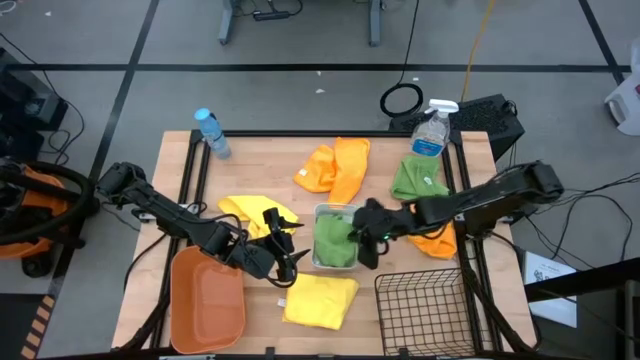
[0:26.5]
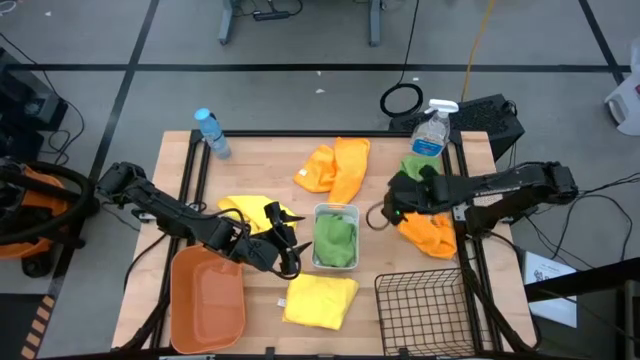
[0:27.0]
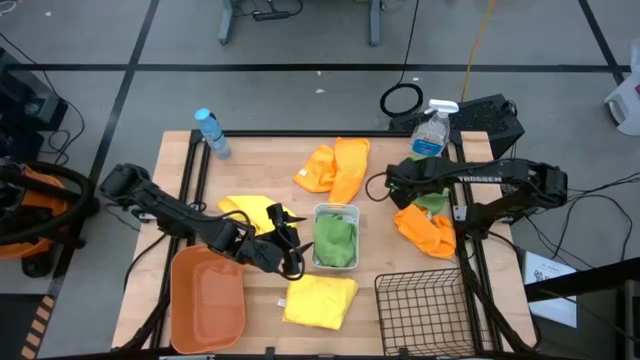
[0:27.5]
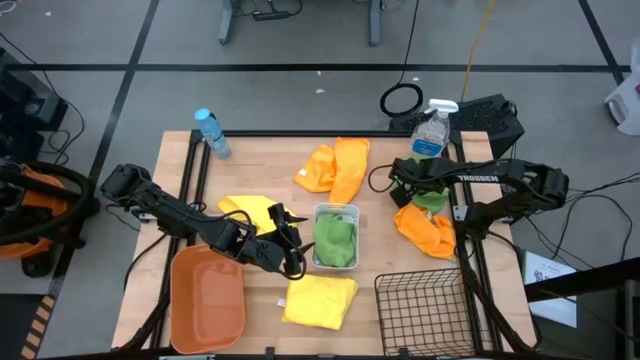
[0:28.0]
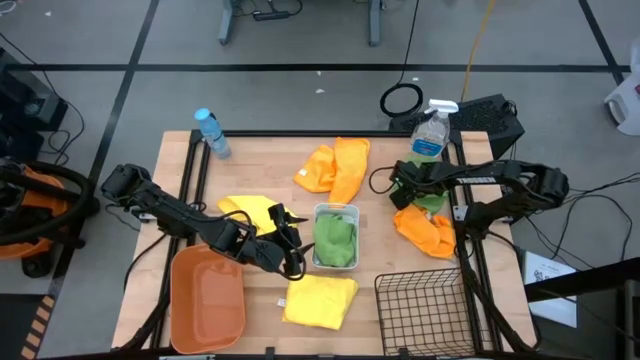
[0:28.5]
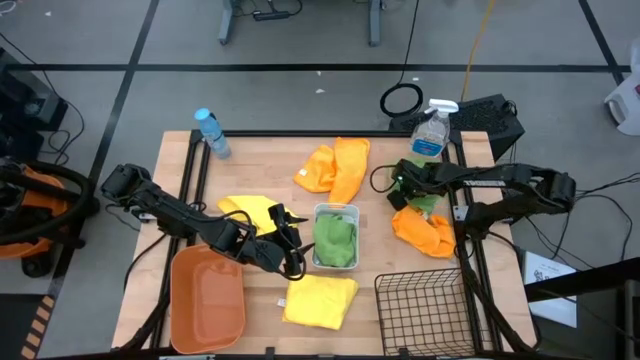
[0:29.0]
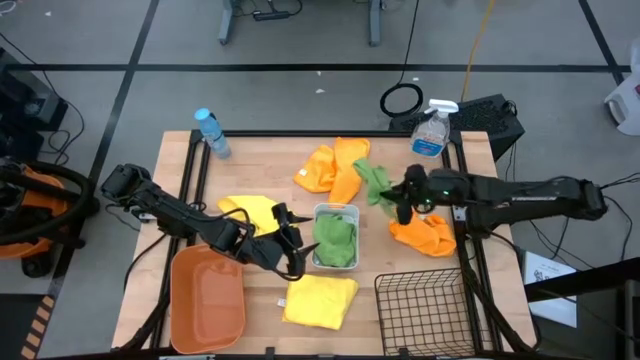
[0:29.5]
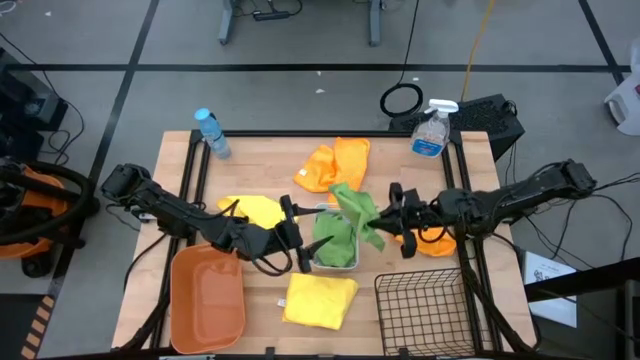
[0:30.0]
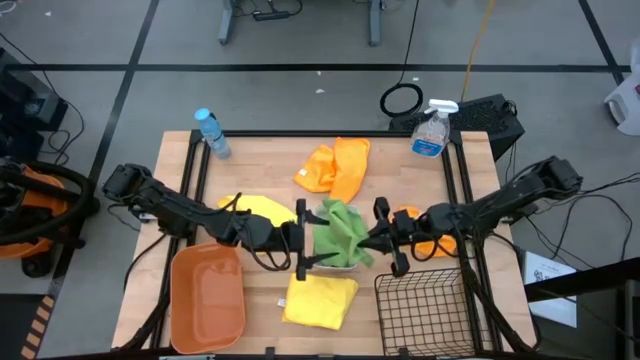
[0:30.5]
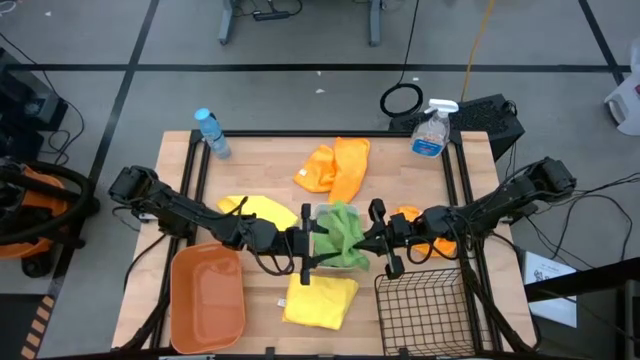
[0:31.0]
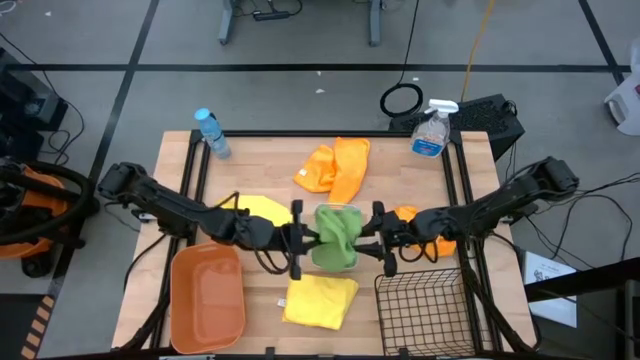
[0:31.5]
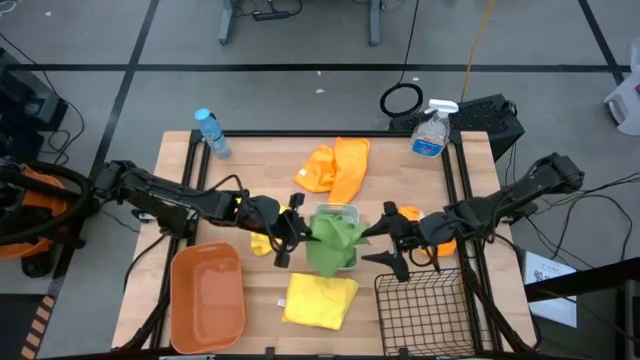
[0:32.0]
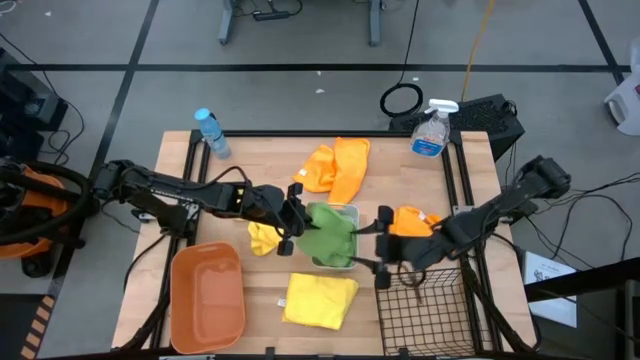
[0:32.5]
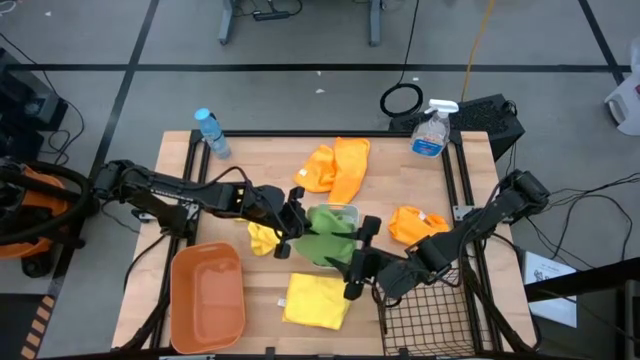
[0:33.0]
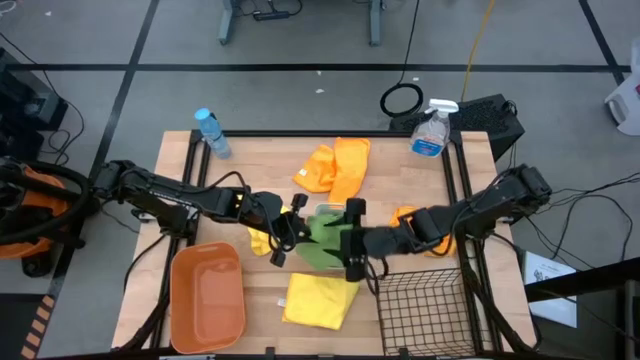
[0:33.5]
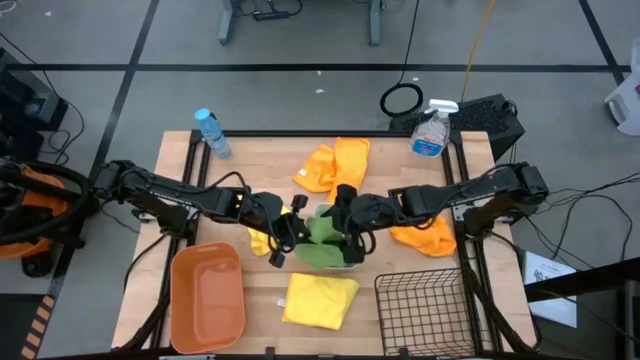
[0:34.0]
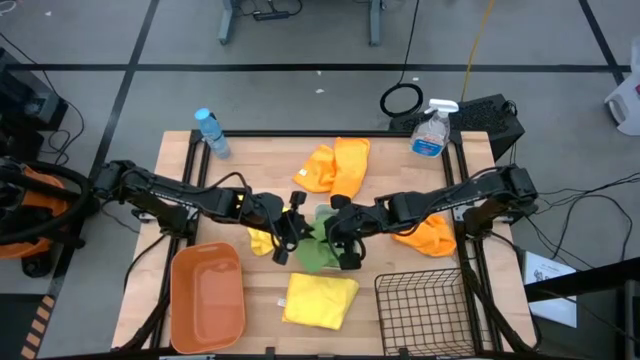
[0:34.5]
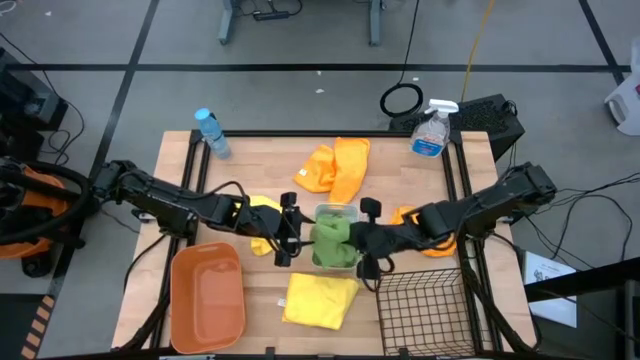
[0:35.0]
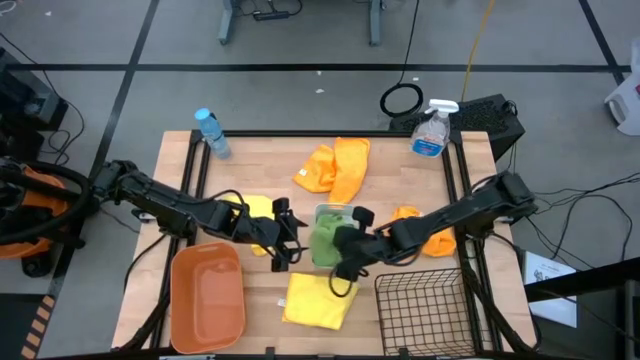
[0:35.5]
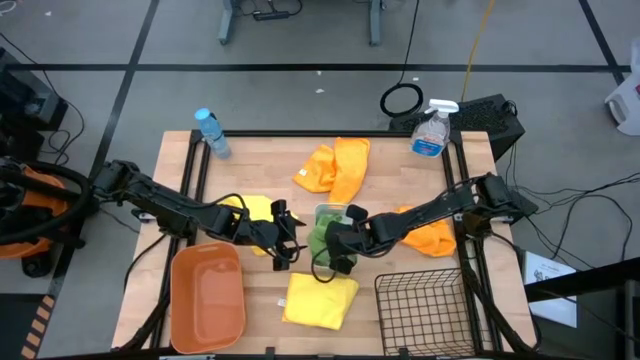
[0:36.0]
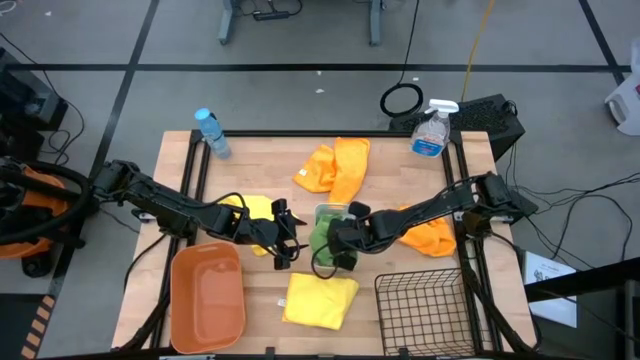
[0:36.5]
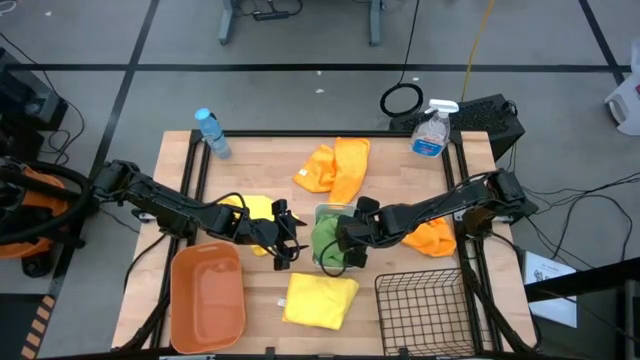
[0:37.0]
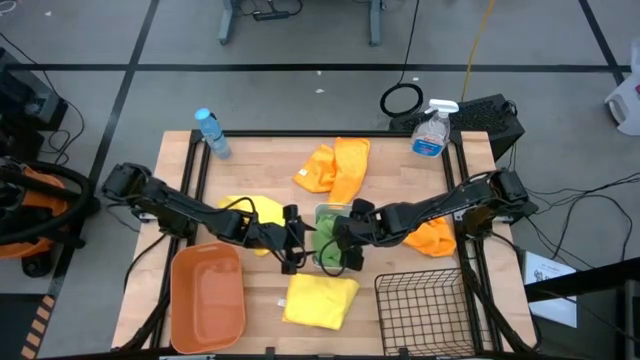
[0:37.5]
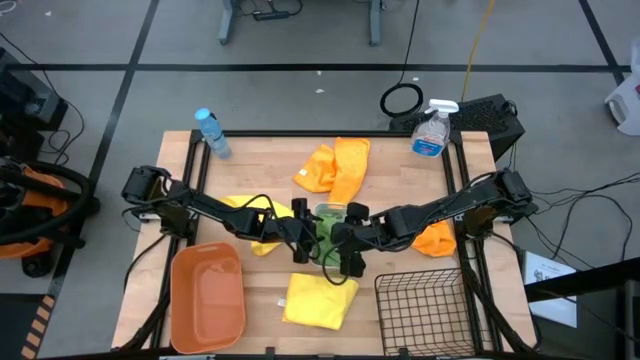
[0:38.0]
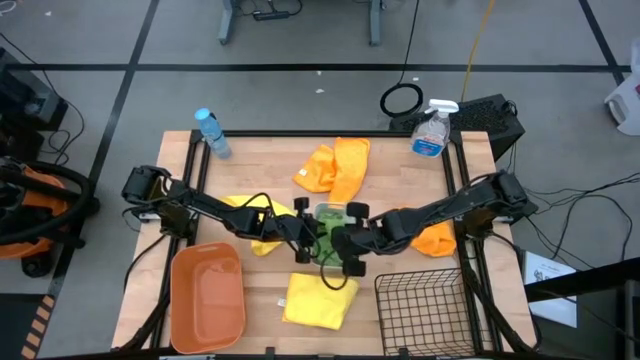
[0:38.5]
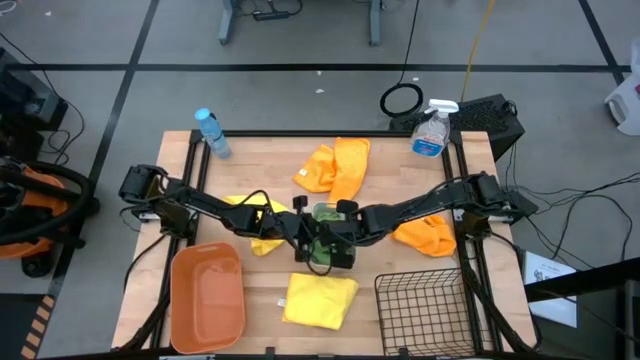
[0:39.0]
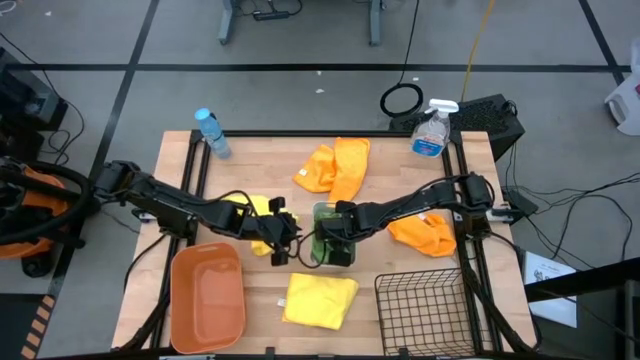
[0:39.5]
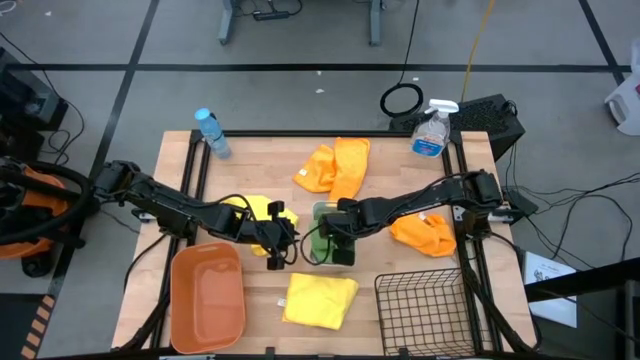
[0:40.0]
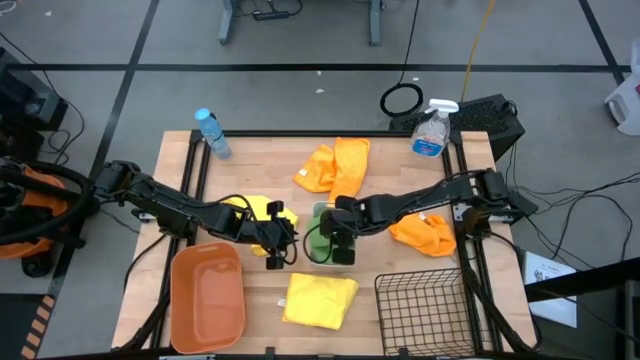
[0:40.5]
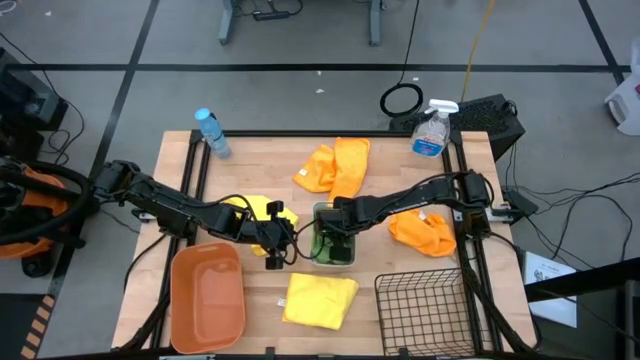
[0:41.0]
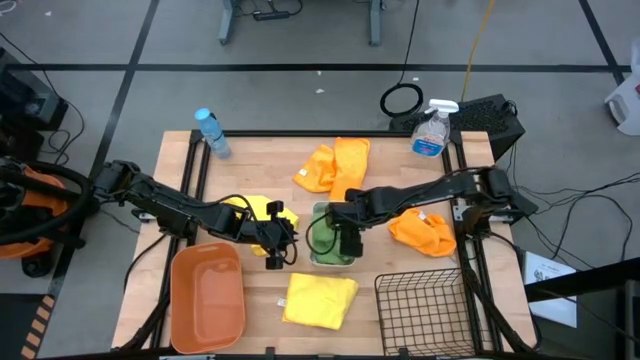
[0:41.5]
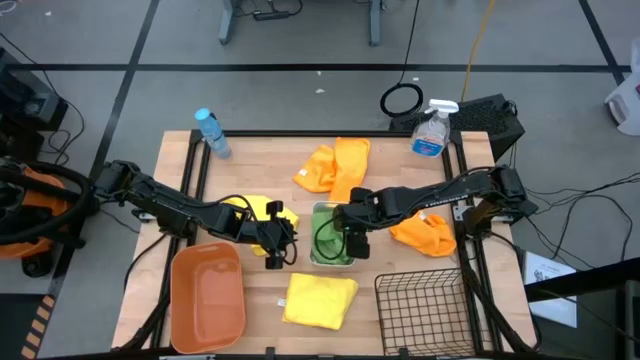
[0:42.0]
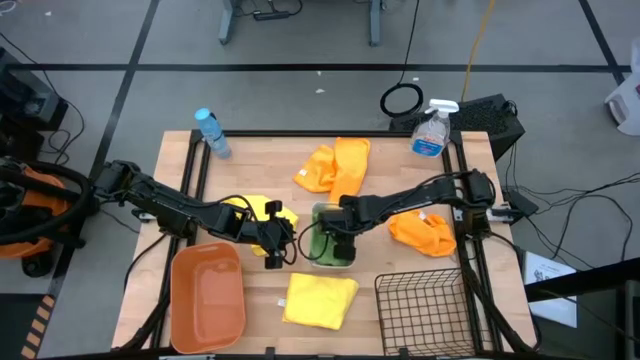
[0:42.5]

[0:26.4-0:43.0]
Task: Sort microfiber towel by color & place in baskets
Put the green microfiber towel into the white bin

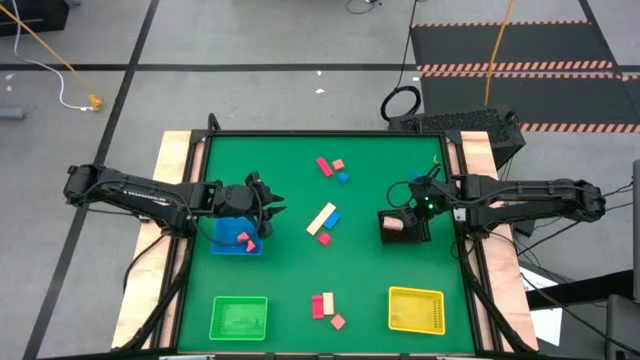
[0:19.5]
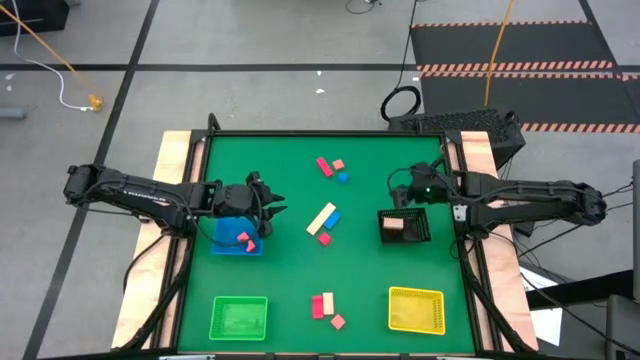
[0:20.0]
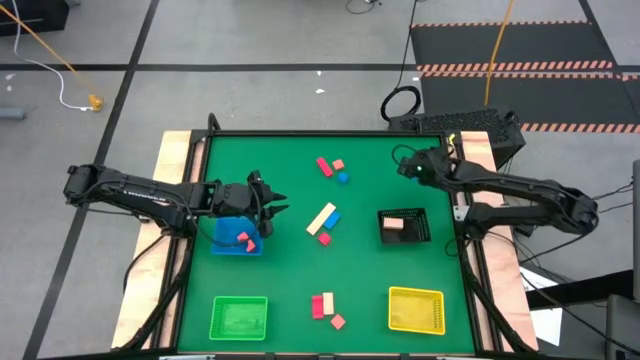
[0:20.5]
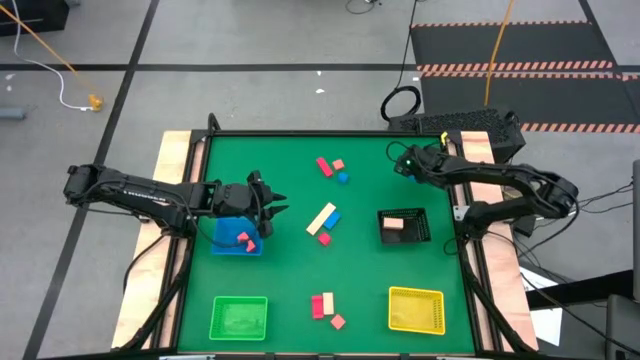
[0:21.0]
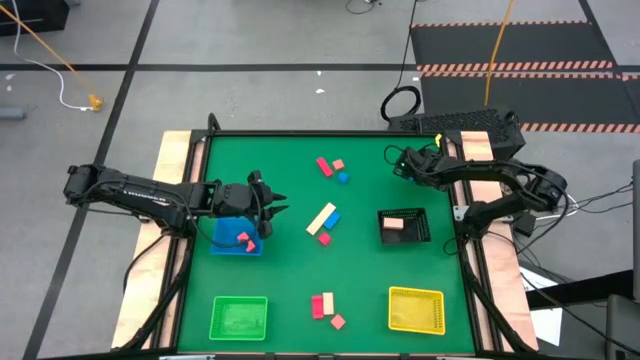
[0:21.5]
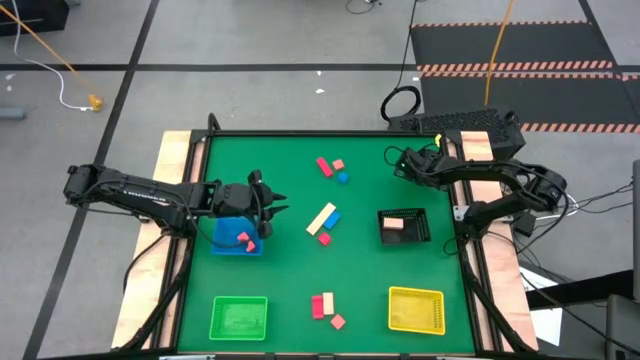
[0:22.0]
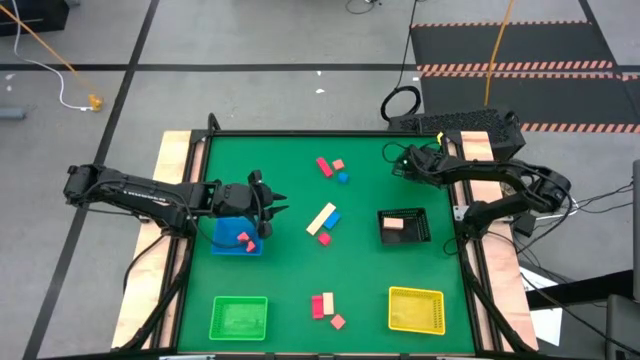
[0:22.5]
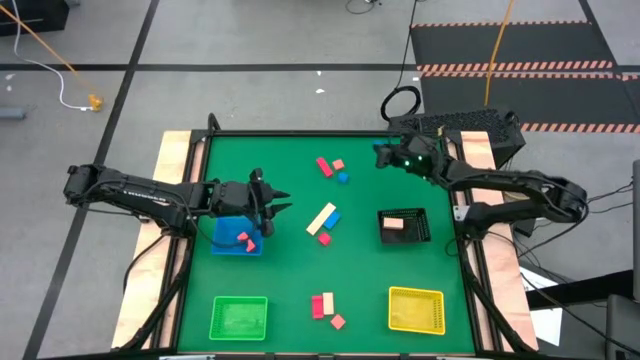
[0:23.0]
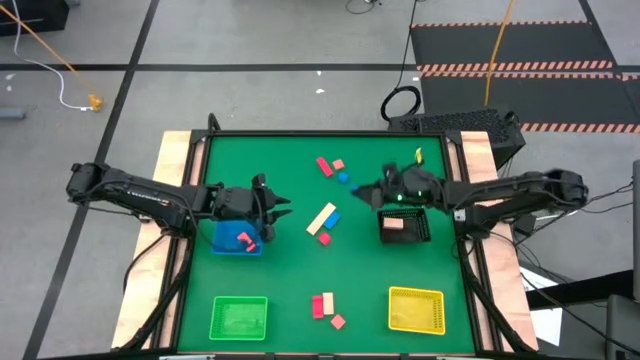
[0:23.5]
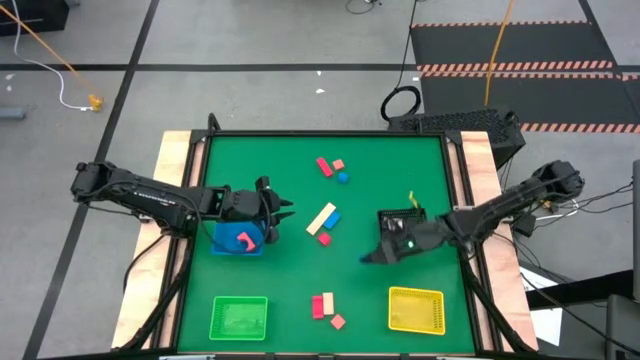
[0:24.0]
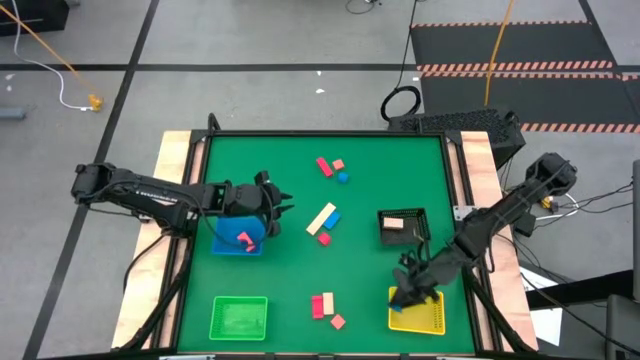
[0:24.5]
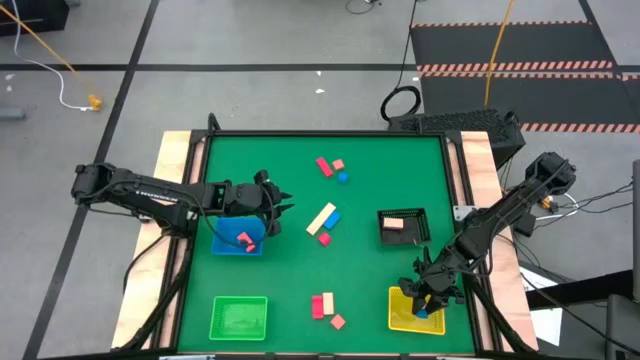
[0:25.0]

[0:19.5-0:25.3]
Task: Sort & place blocks by color
Put the top right blue block into the yellow bin
